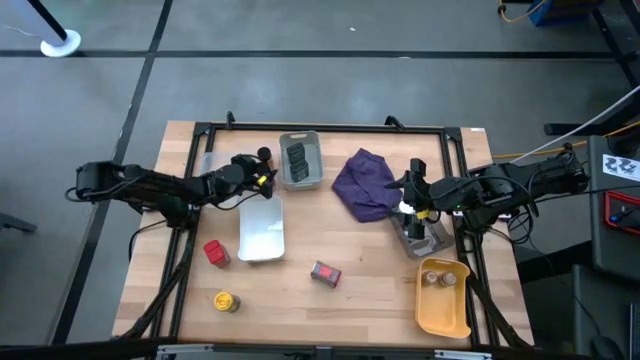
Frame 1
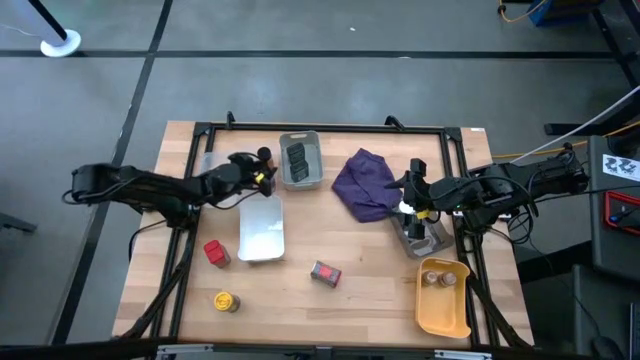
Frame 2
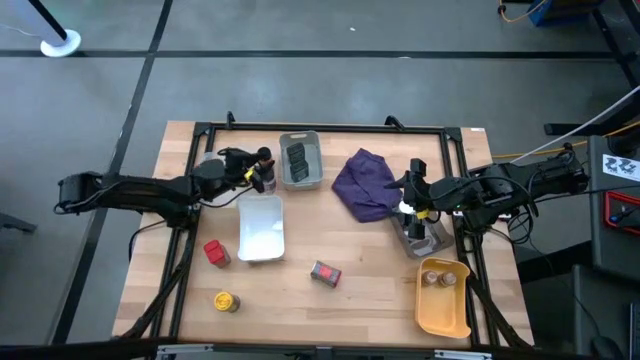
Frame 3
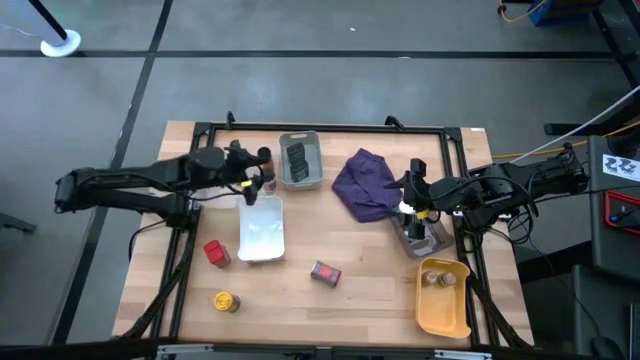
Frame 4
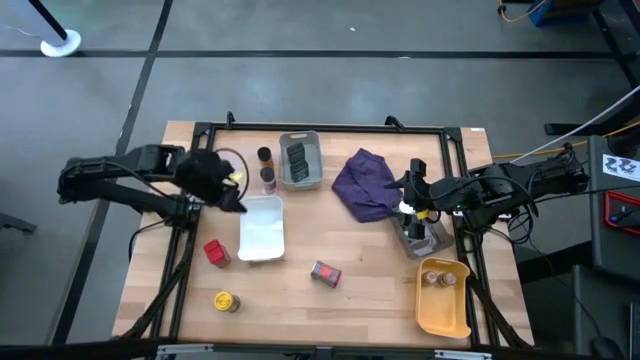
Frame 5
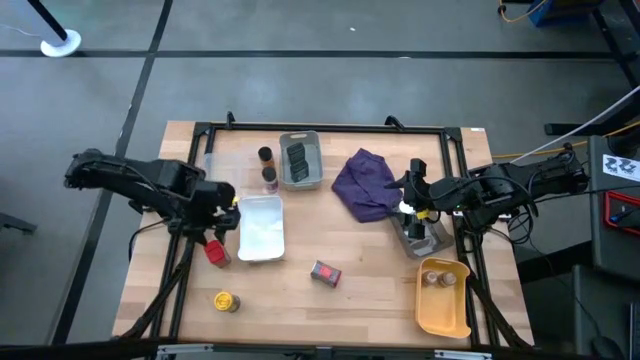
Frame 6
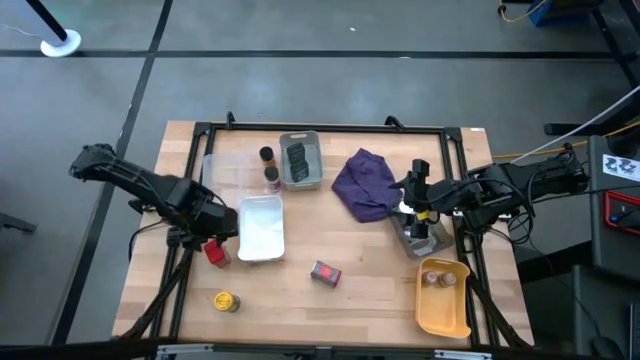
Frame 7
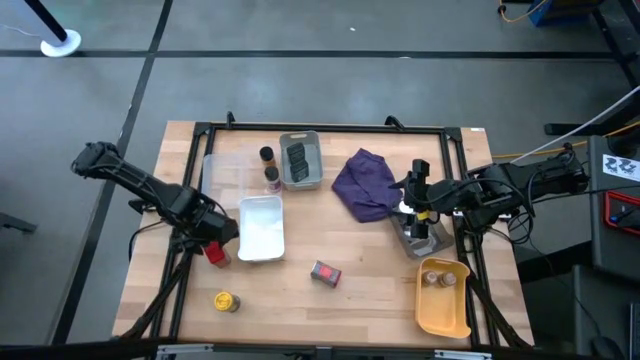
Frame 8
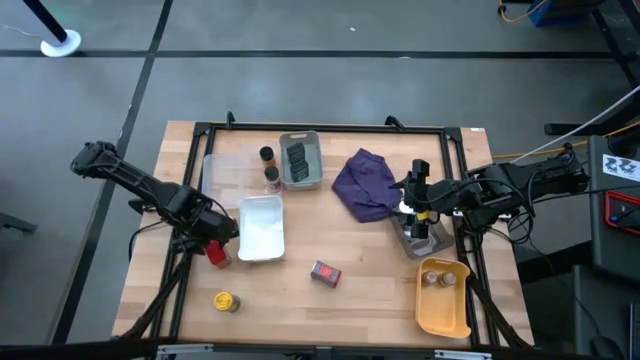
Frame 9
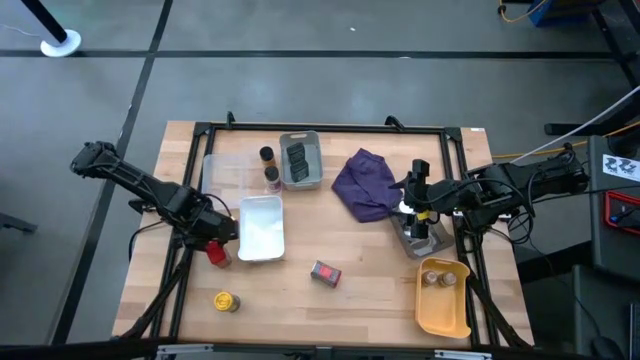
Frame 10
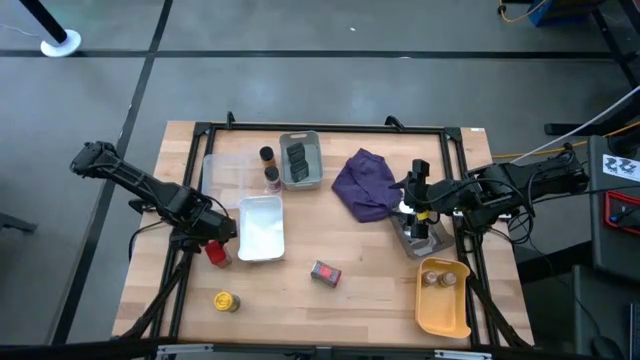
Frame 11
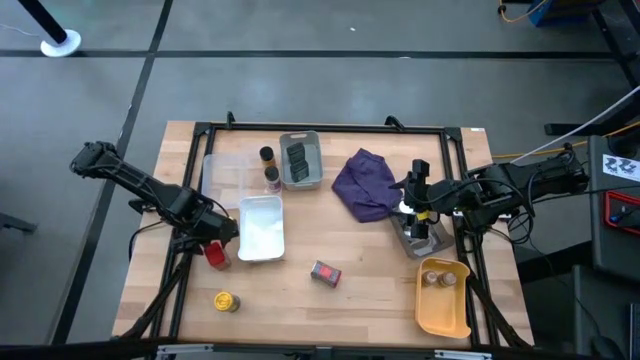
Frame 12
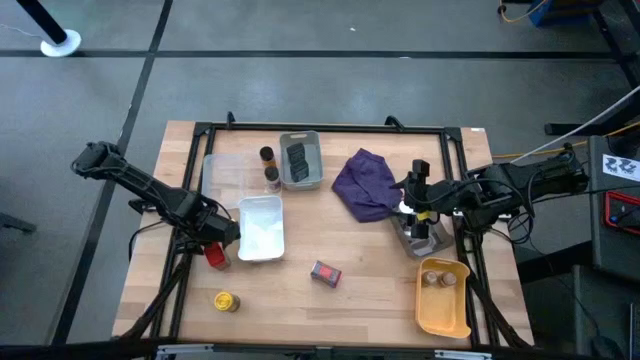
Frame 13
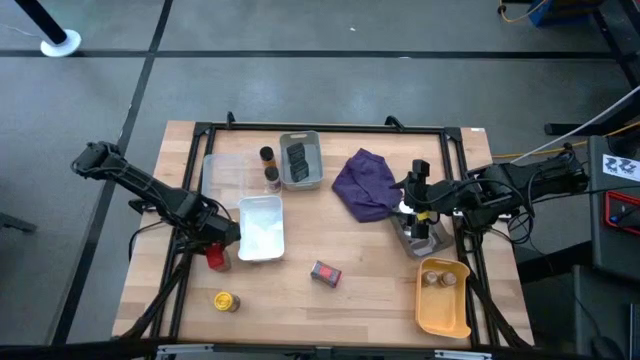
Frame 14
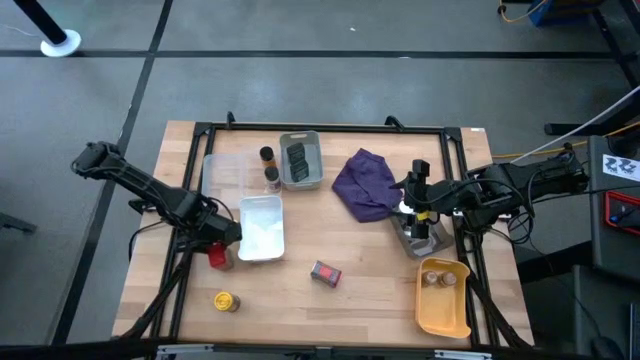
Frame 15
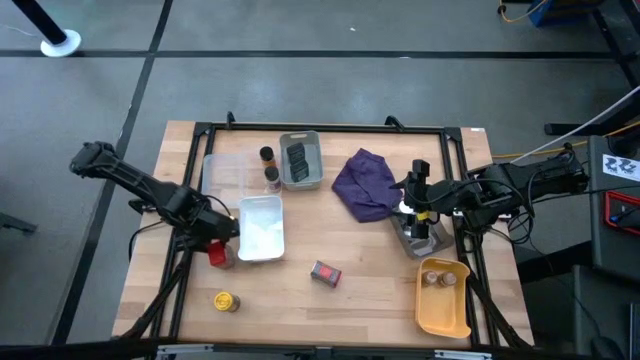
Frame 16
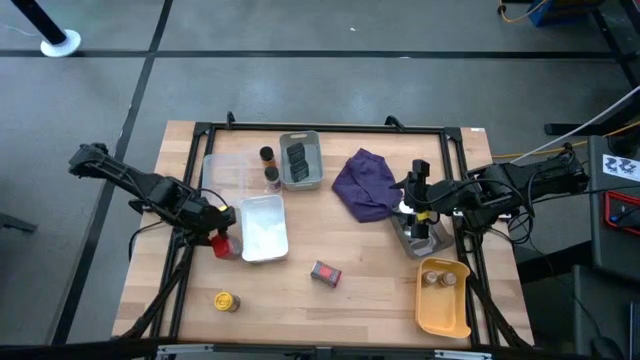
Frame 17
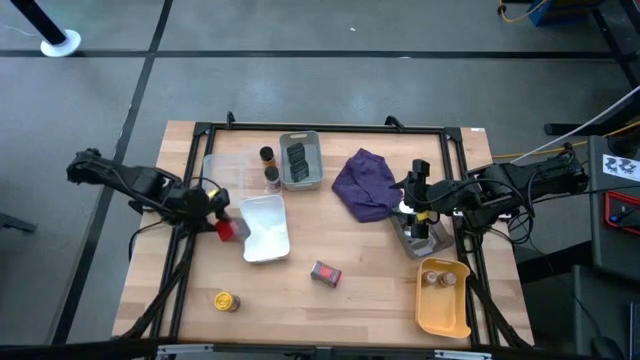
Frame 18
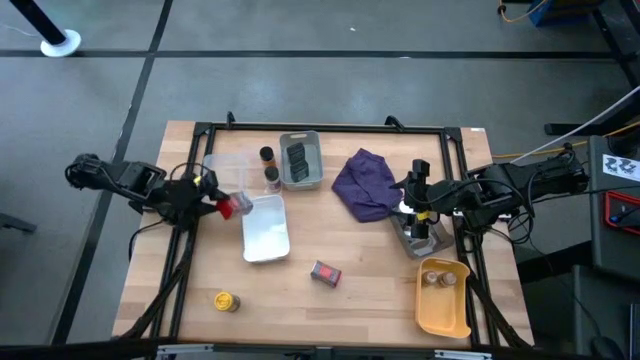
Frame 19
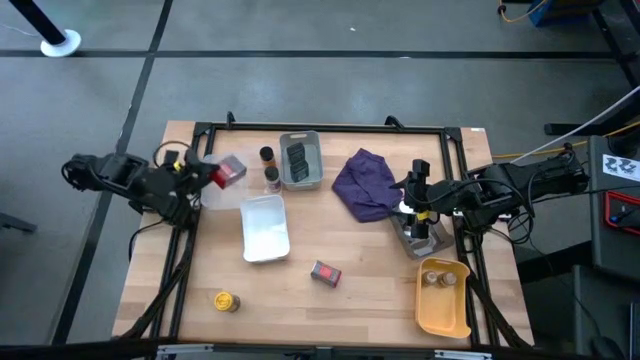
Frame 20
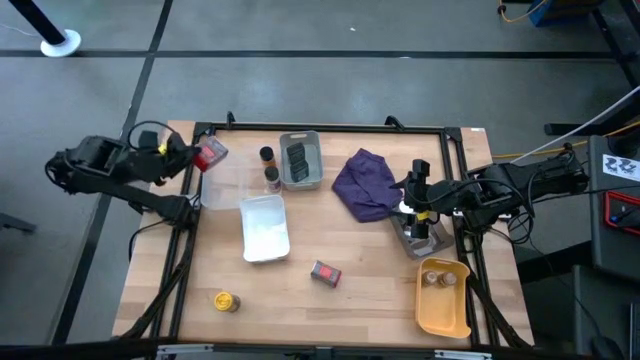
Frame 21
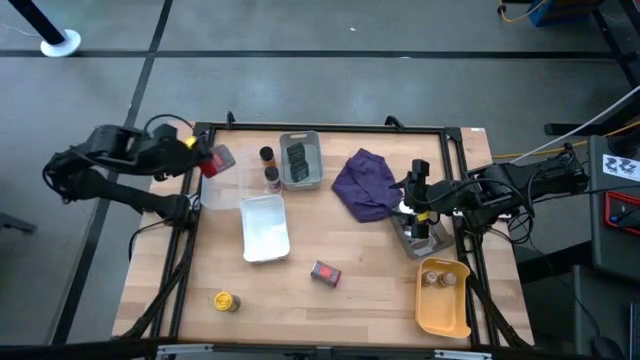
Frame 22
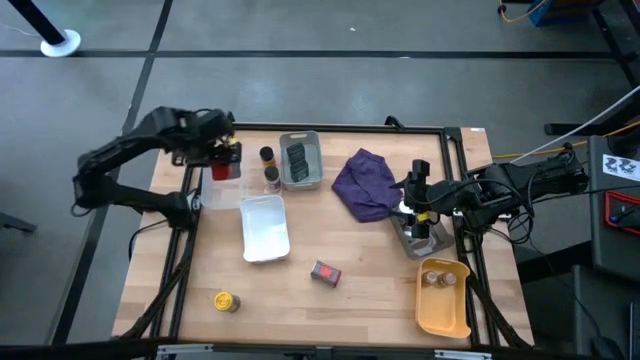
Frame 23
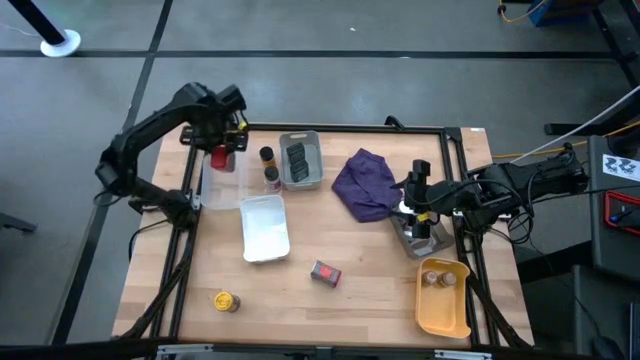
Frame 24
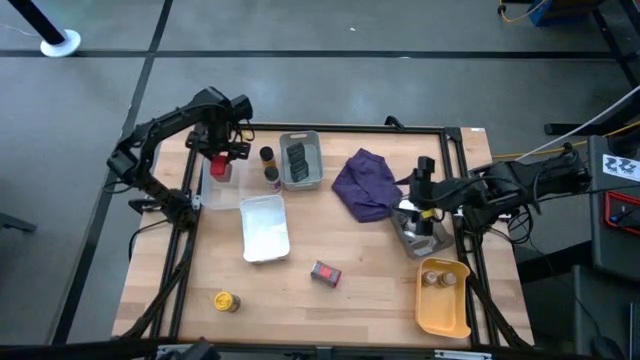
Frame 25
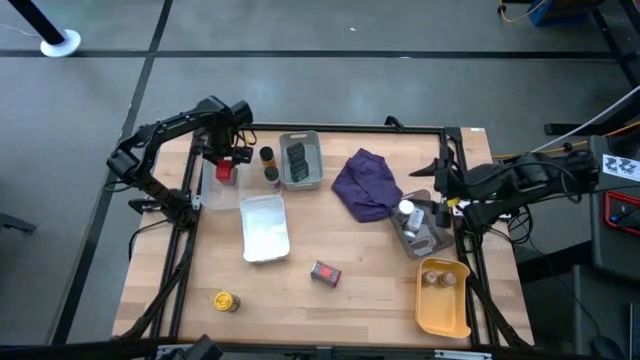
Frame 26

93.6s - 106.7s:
Task: Sort spices by type
Put the red seasoning can into the most top left transparent bin

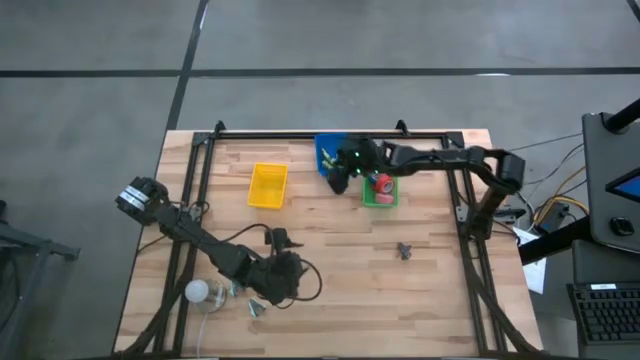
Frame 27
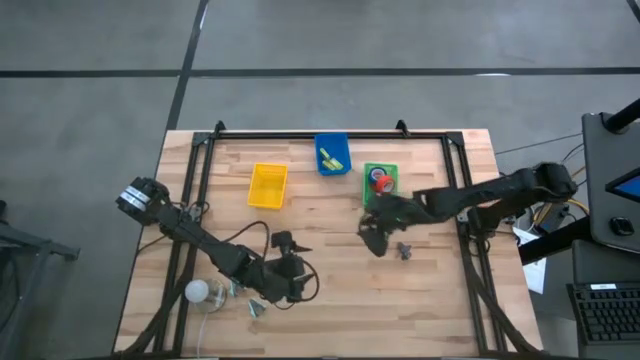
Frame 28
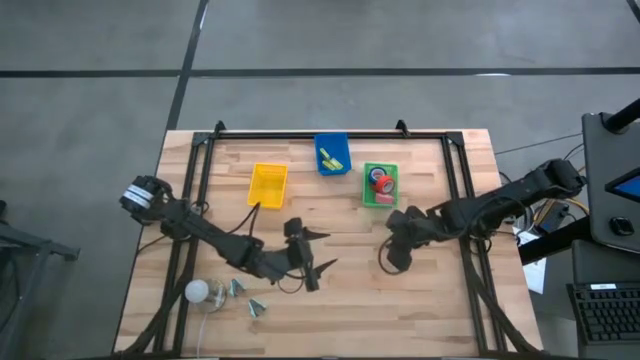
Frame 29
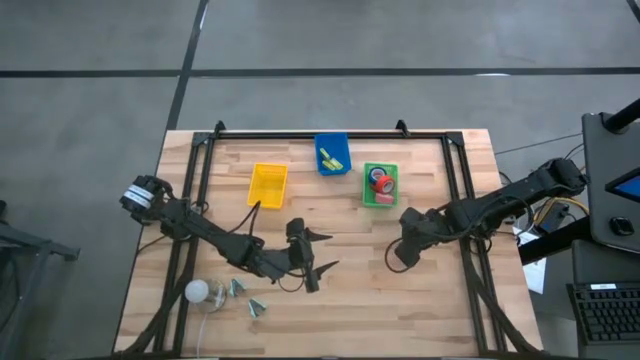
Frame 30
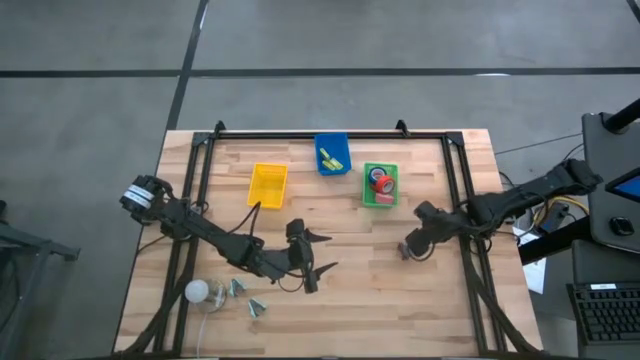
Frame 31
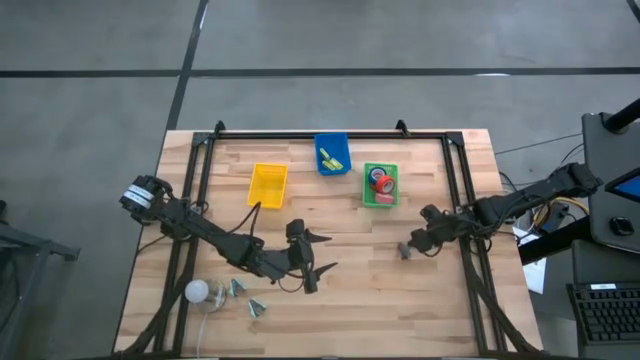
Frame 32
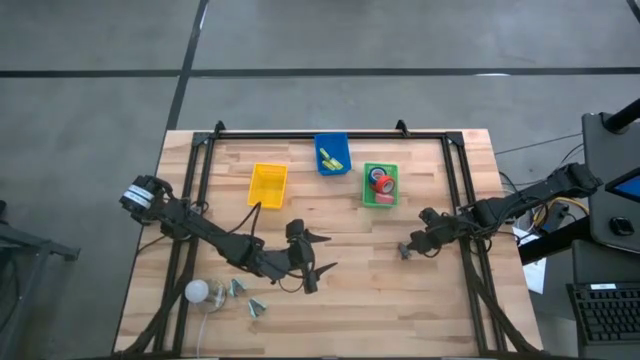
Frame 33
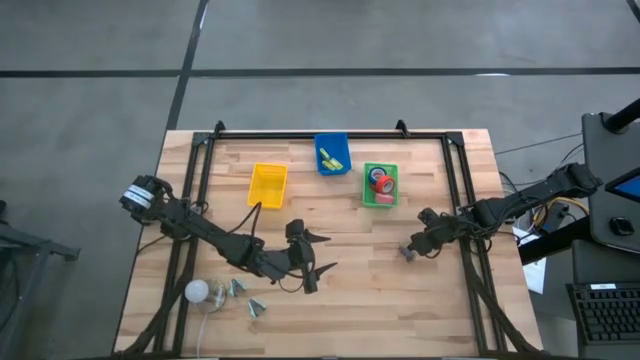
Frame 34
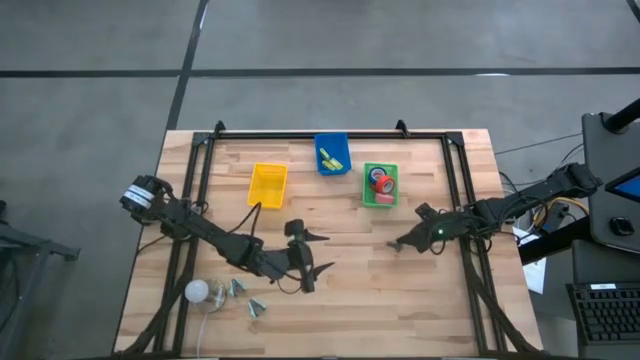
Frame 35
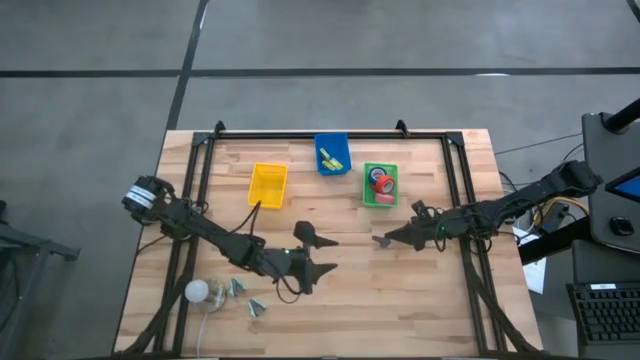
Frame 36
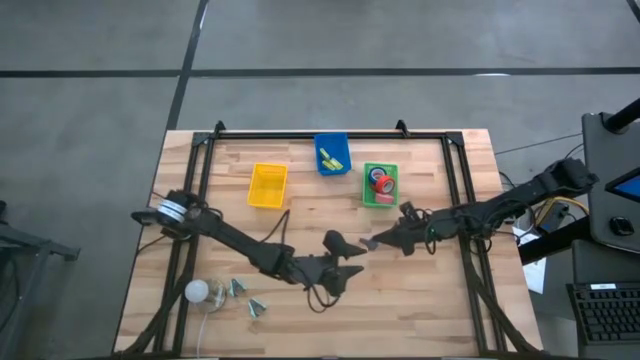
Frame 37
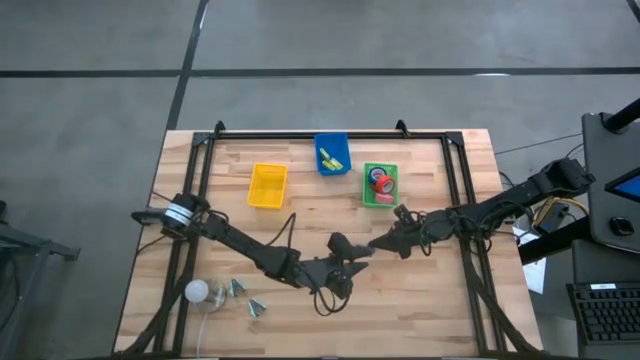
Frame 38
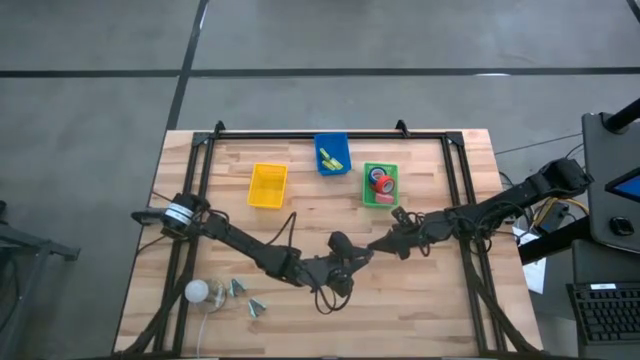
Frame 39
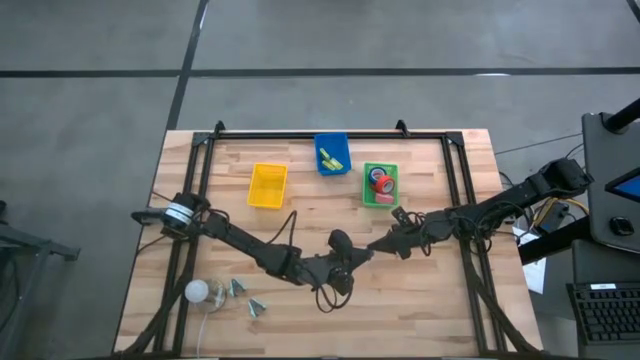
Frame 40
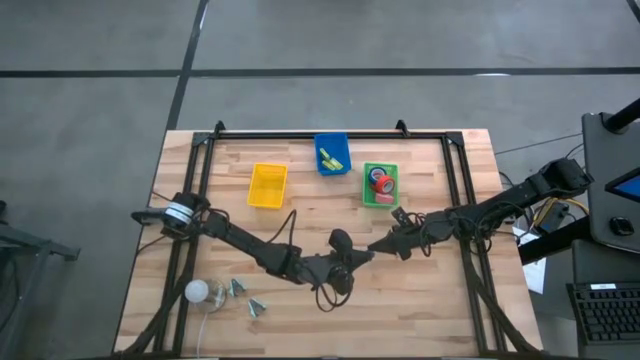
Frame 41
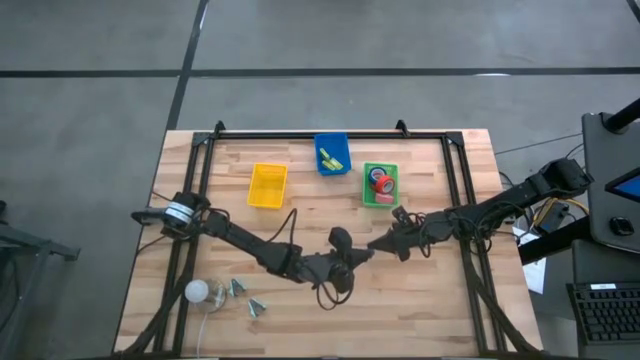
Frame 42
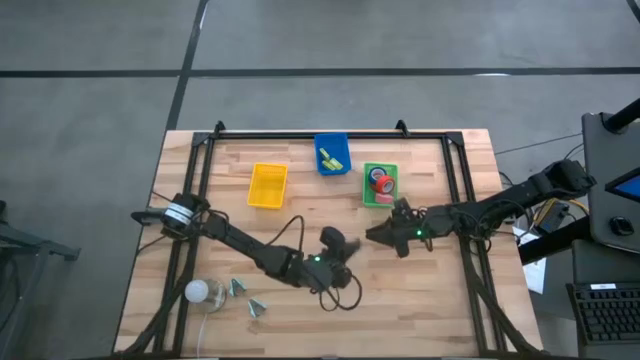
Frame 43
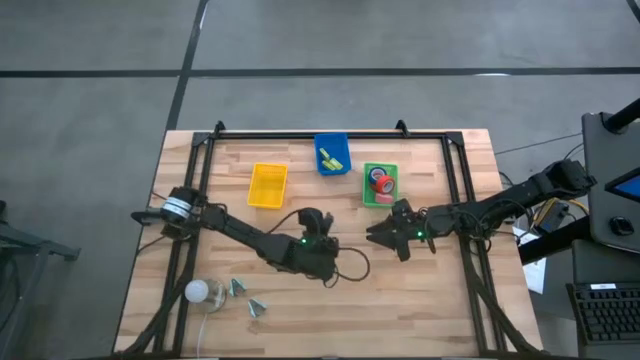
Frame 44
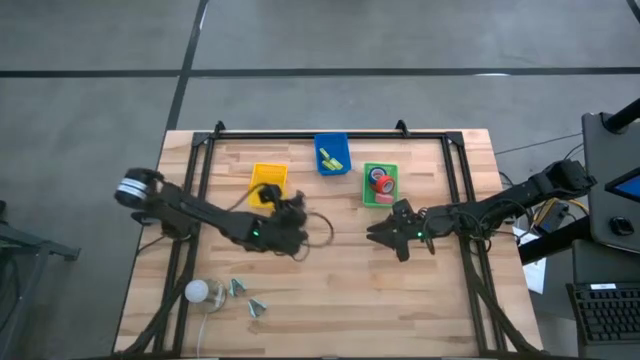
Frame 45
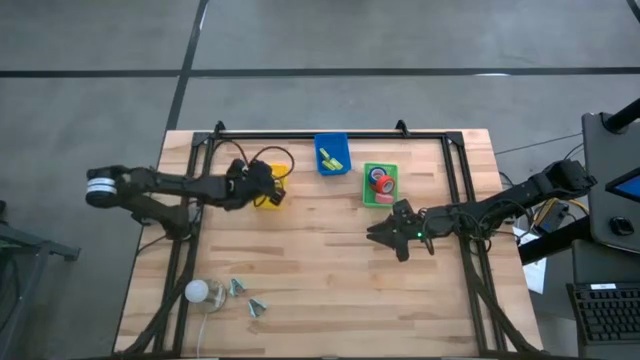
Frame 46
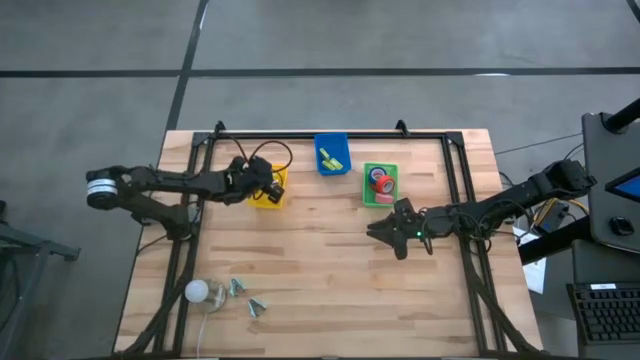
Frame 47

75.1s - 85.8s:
Task: Pick and place Stapler, Stapler remover, tape
Put the gray staple remover into the yellow basket
